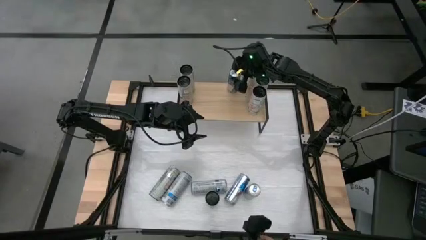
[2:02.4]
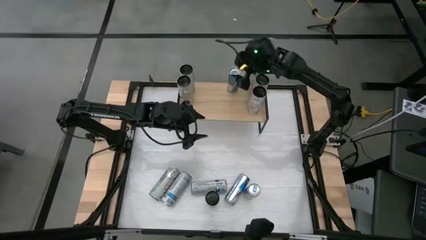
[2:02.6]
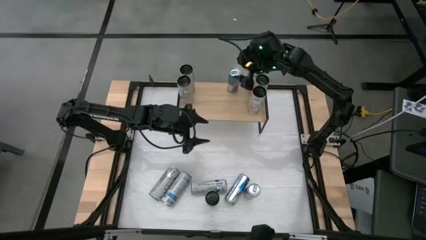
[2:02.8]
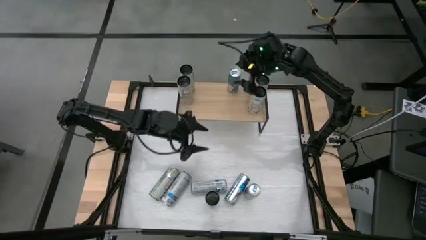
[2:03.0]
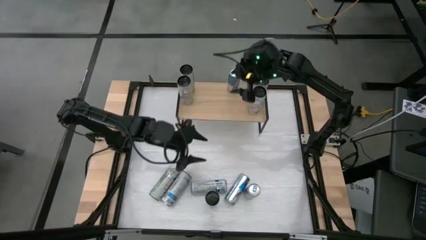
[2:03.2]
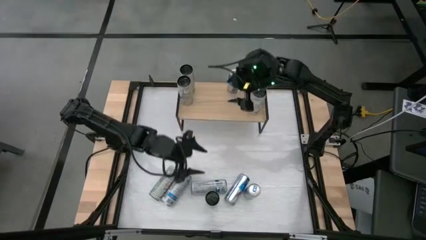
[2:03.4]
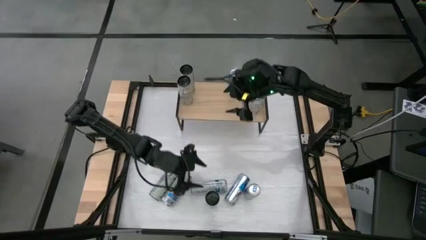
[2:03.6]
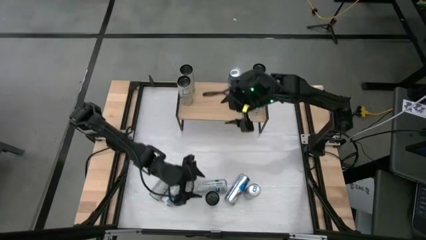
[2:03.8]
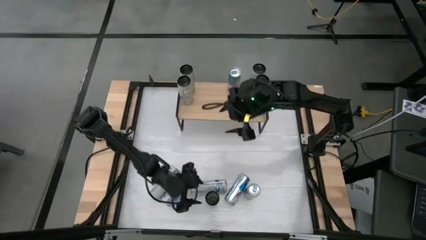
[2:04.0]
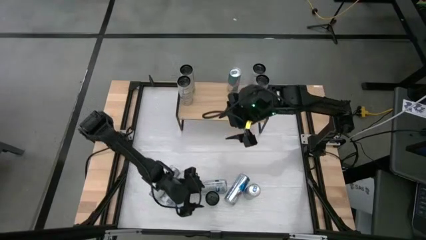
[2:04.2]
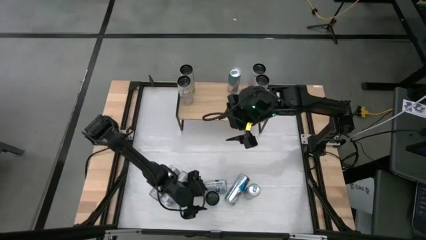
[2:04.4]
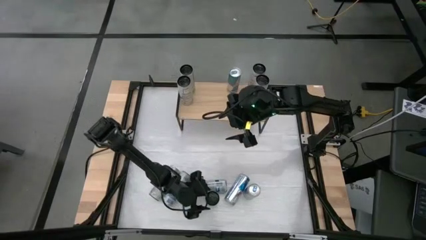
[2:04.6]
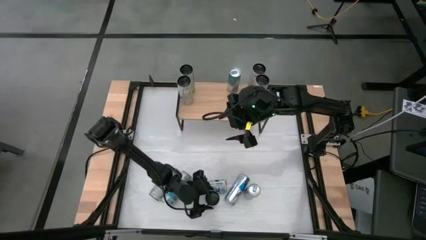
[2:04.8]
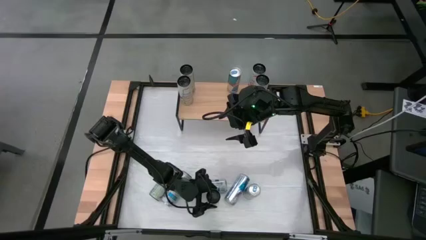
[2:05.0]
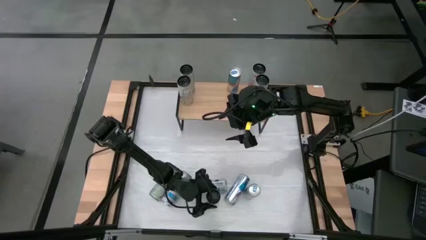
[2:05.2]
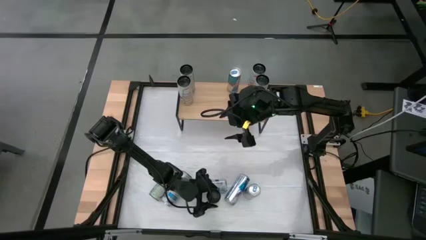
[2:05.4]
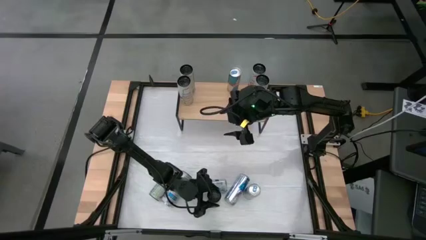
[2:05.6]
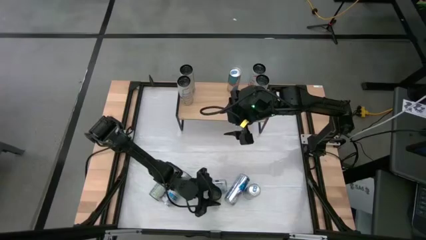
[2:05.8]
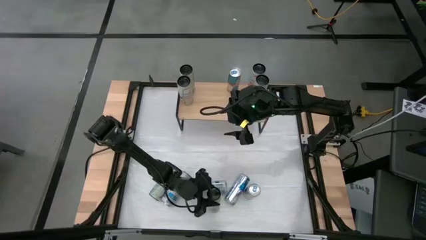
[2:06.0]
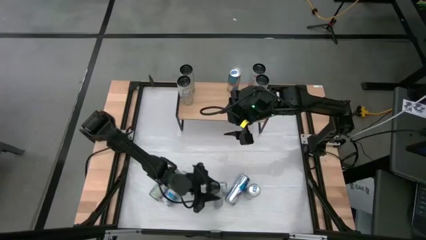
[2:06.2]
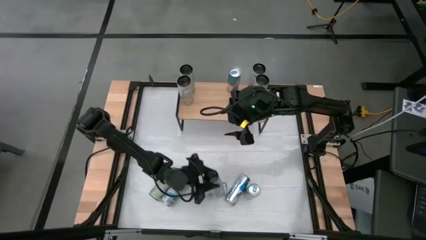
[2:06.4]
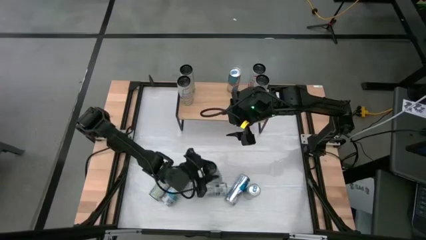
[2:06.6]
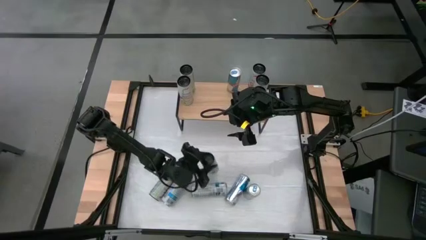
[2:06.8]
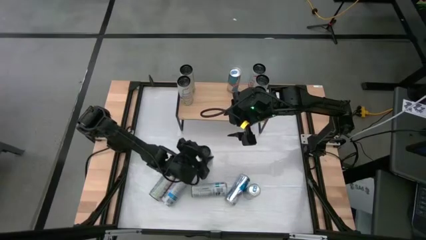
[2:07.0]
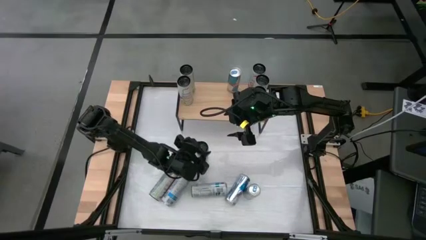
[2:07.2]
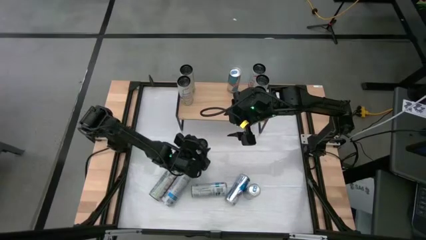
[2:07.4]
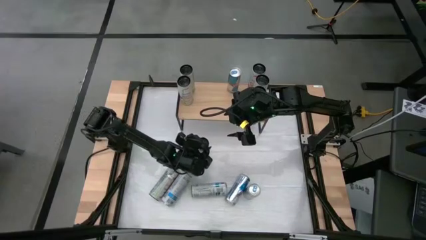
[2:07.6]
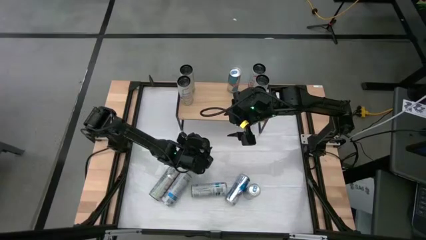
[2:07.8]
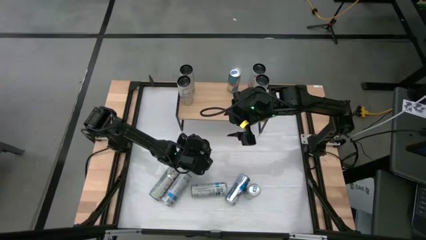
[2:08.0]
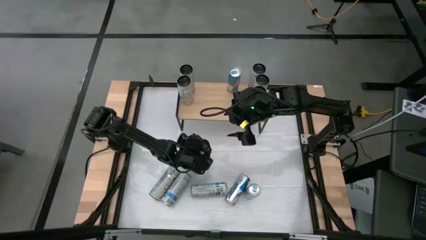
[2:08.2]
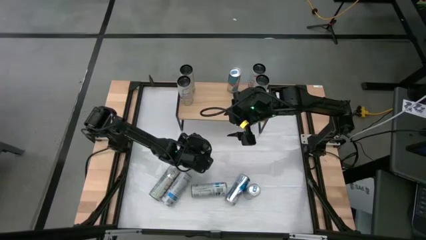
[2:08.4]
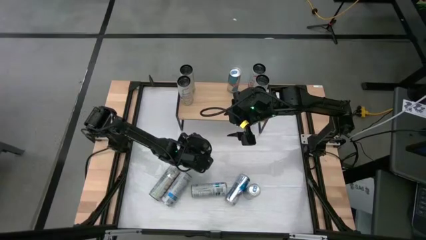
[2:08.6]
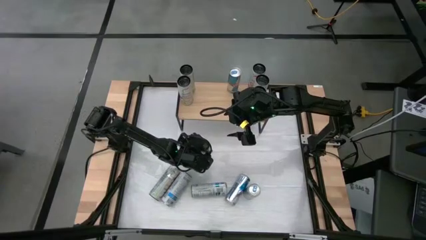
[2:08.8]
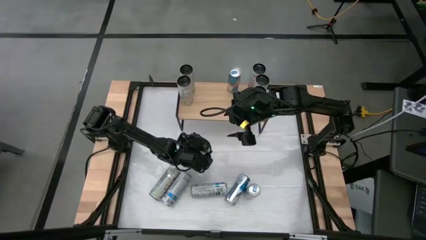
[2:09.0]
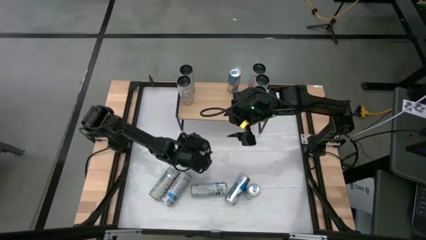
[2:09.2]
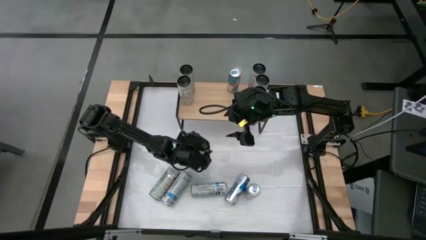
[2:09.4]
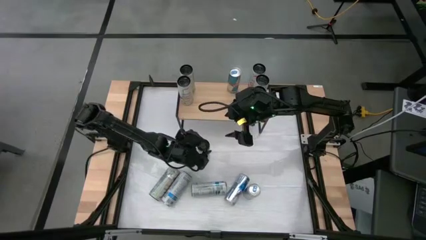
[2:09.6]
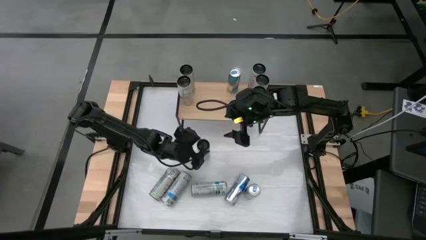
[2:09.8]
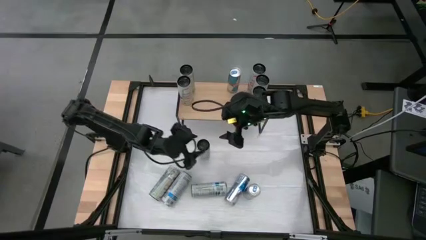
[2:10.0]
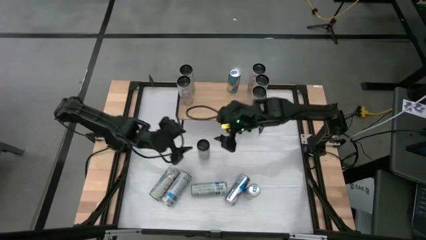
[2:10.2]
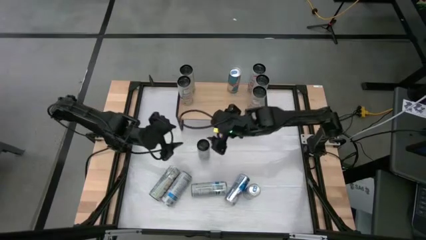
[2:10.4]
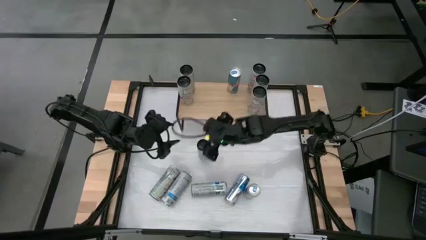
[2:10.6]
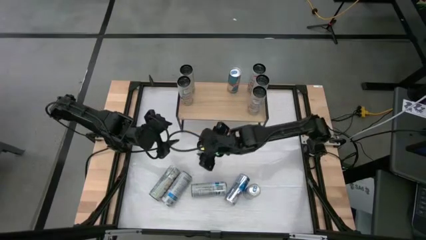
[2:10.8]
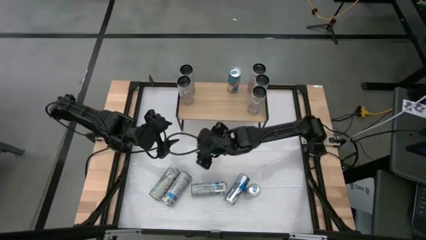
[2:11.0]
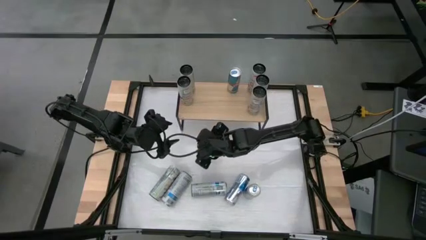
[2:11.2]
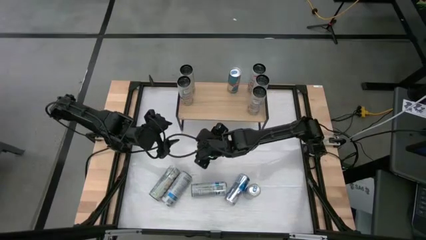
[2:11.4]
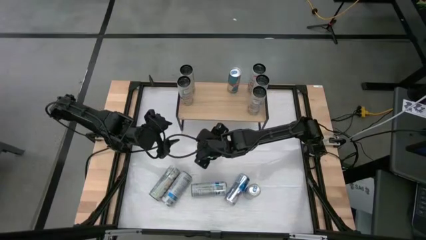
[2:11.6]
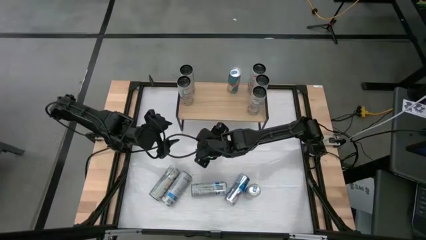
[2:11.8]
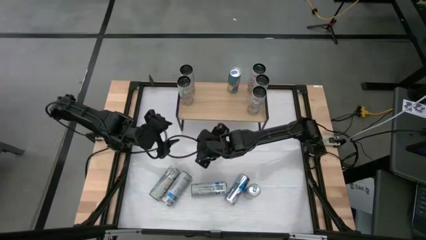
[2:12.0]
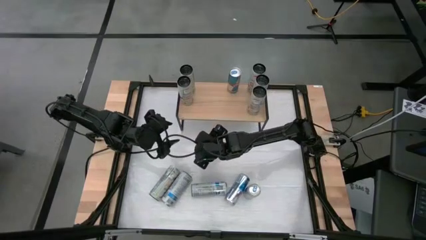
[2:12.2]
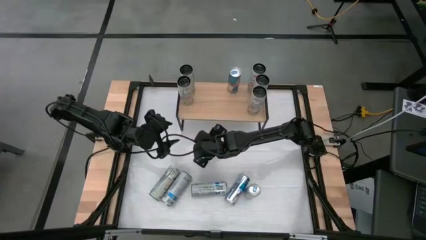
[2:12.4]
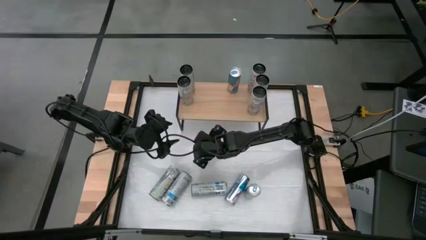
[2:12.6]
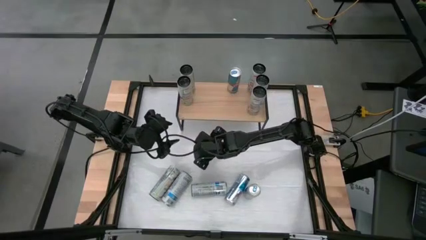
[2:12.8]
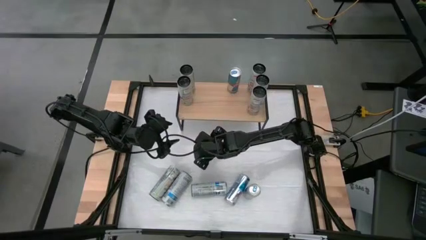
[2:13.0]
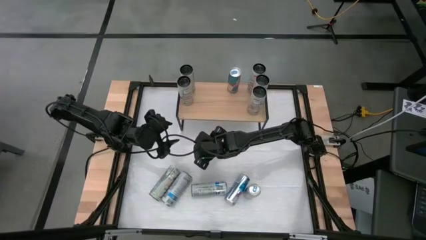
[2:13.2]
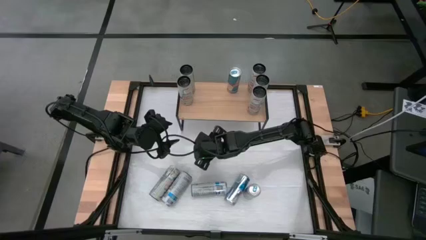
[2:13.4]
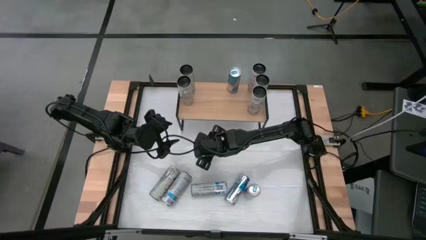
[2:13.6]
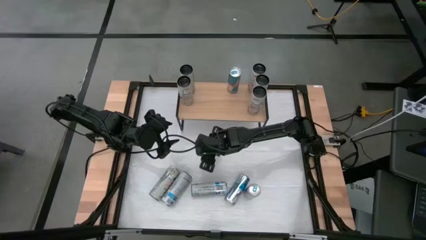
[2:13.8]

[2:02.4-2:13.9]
Task: Sort soda cans
Put the bottom white blue soda can on the shelf

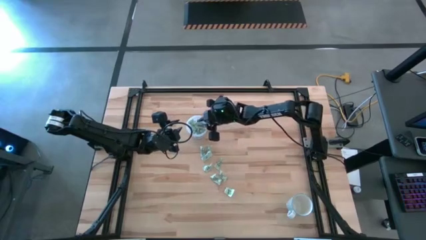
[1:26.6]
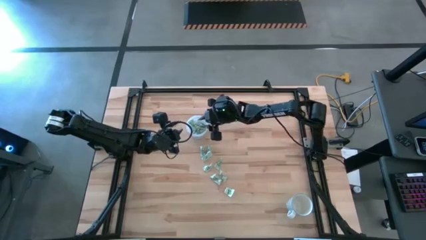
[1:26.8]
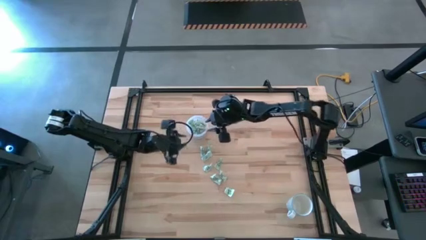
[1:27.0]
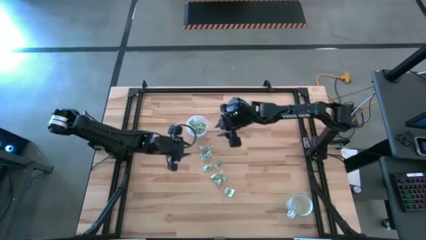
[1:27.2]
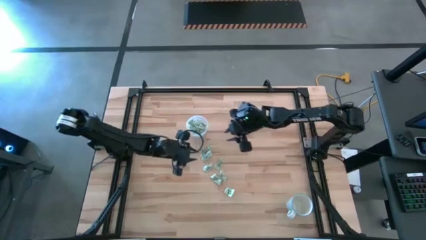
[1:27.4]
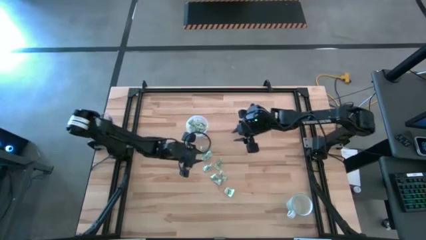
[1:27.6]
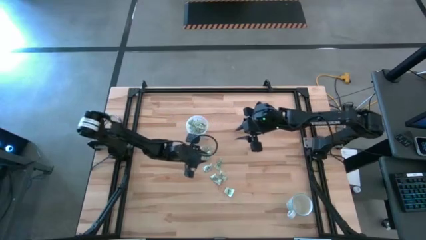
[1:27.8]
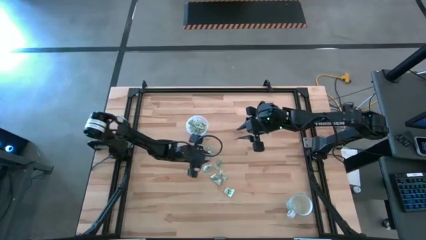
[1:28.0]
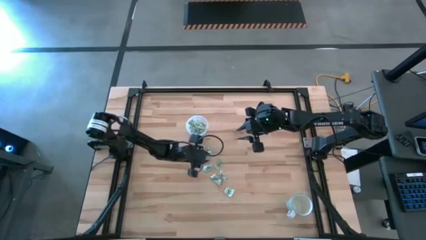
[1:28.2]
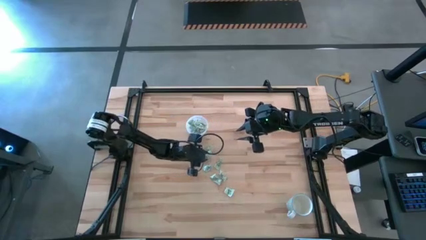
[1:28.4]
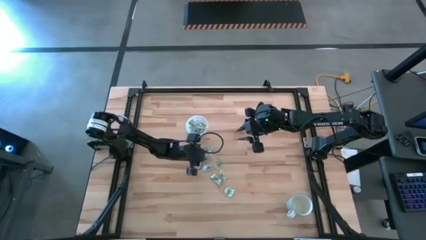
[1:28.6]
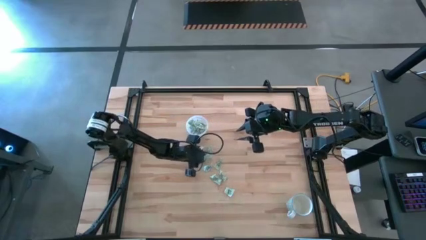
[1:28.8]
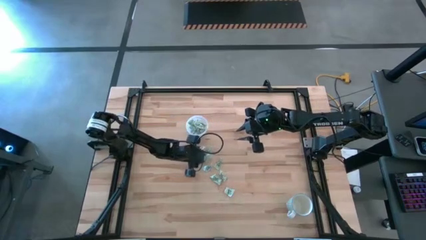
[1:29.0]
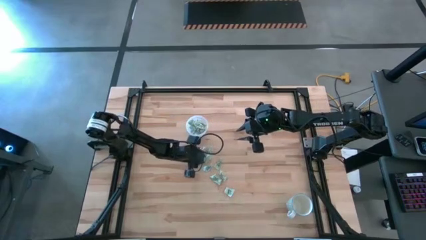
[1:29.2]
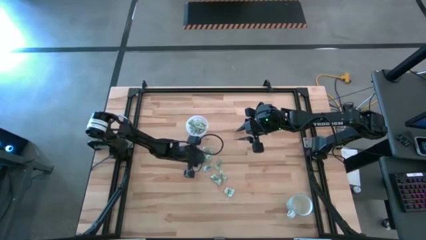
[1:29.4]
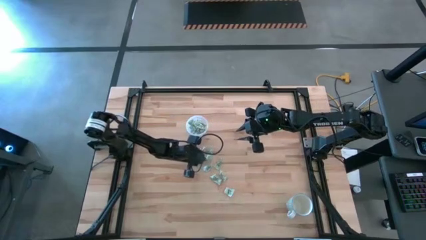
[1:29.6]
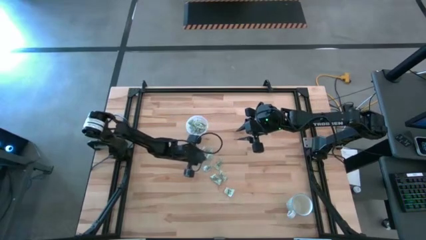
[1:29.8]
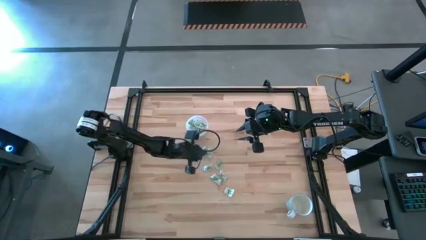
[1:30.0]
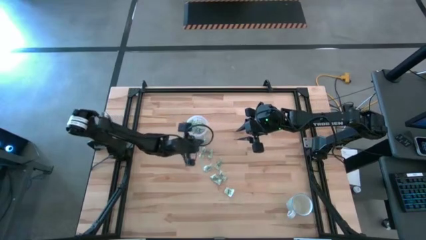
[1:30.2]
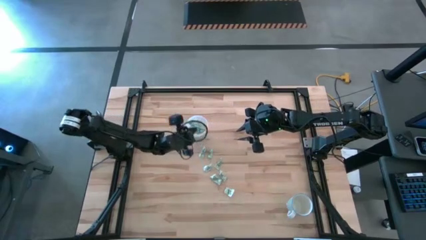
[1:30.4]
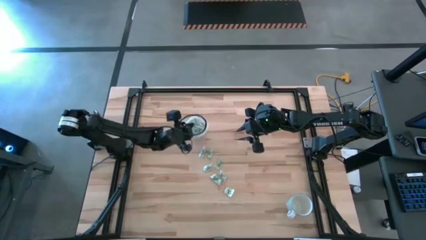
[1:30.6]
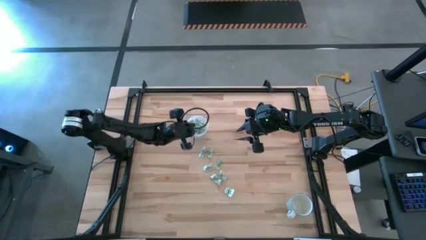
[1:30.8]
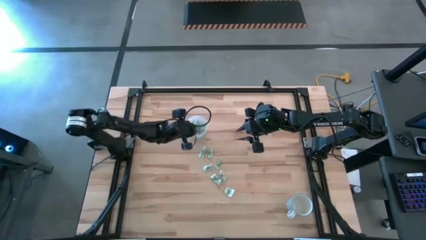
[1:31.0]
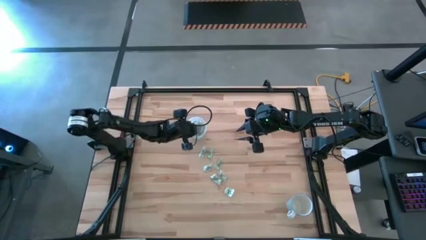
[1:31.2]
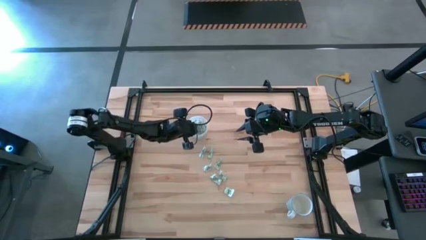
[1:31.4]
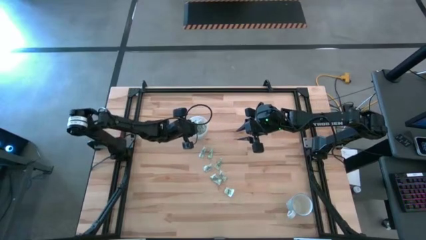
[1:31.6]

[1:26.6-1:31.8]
Task: Pick and place Stevia / Truvia into bins
Put the stevia packet into the transparent container
